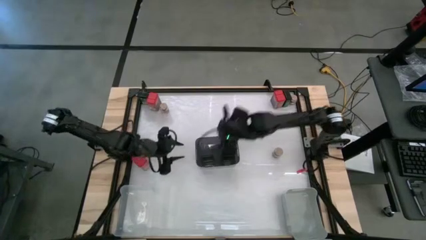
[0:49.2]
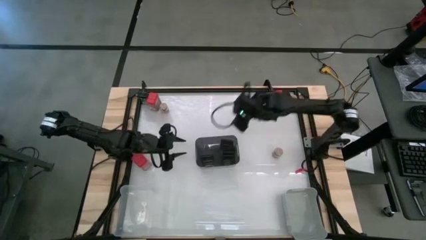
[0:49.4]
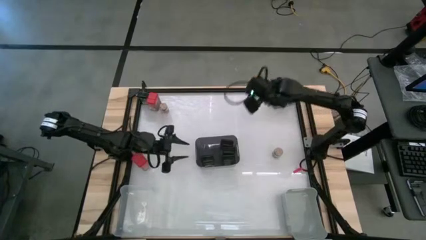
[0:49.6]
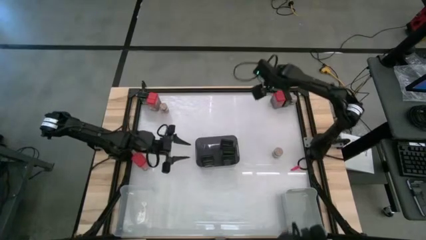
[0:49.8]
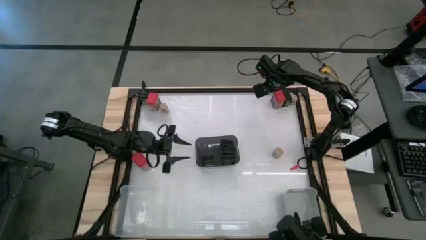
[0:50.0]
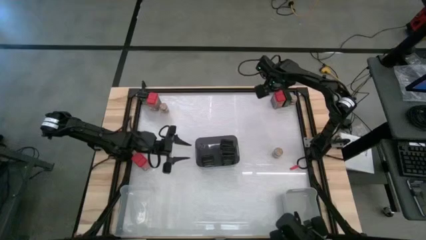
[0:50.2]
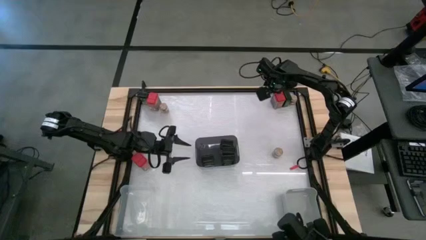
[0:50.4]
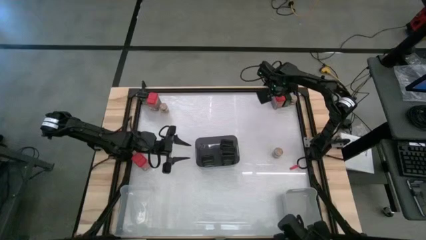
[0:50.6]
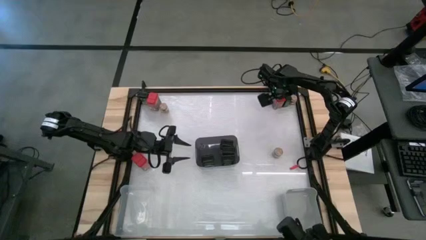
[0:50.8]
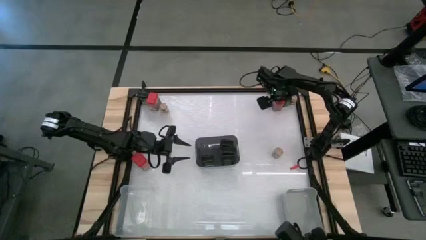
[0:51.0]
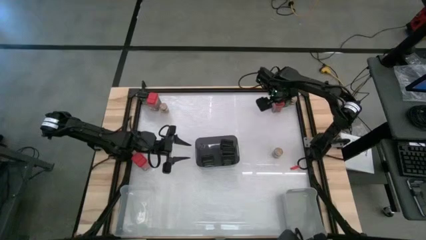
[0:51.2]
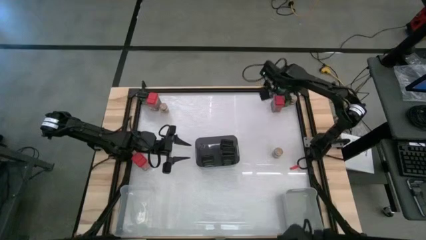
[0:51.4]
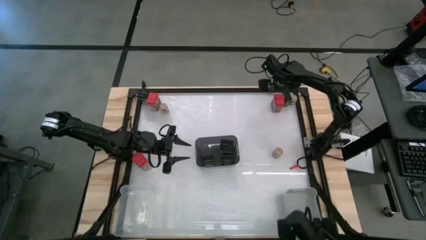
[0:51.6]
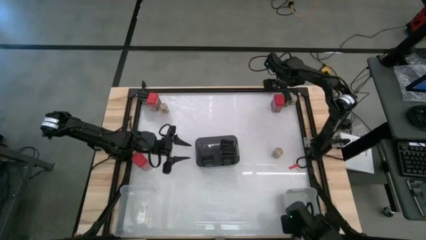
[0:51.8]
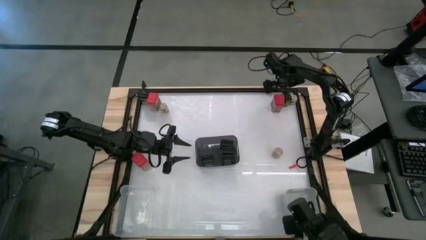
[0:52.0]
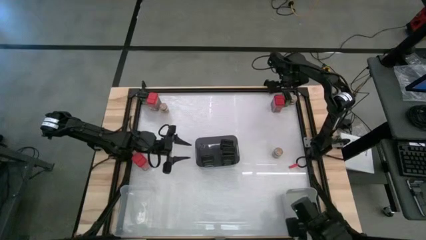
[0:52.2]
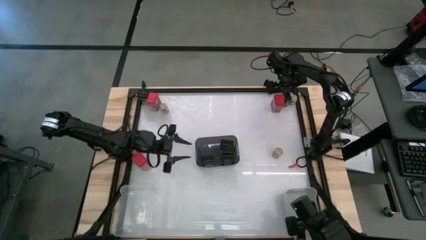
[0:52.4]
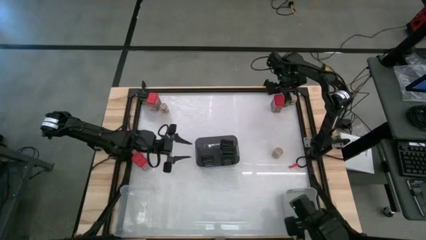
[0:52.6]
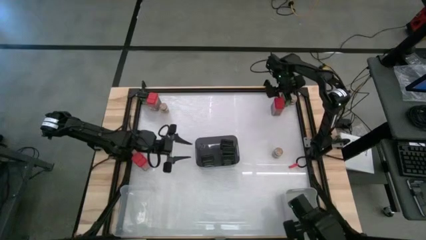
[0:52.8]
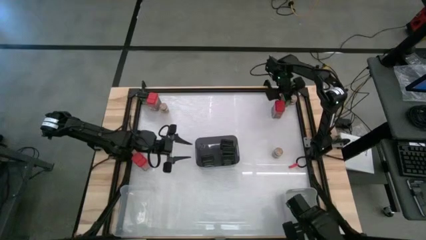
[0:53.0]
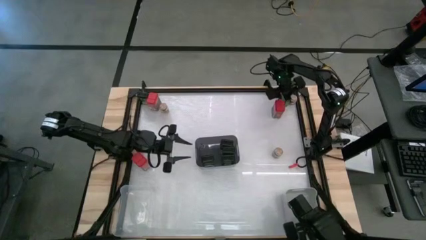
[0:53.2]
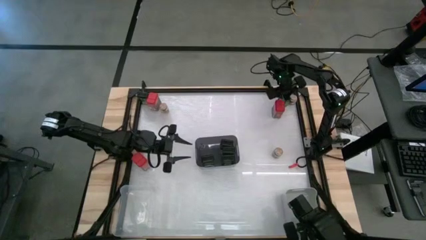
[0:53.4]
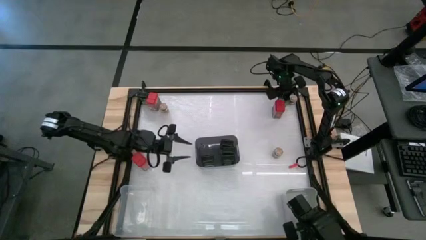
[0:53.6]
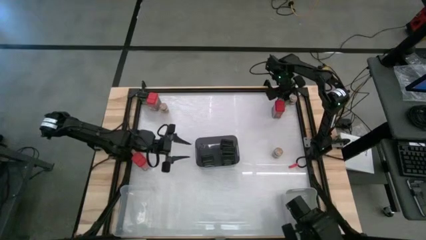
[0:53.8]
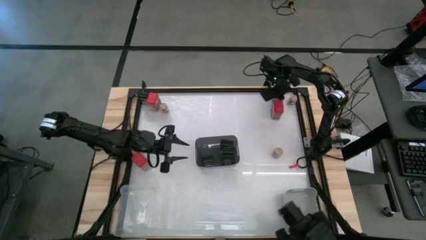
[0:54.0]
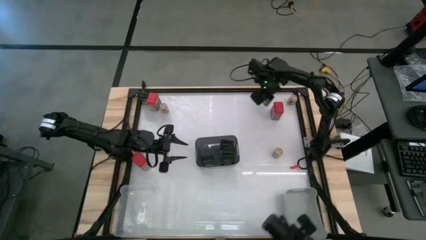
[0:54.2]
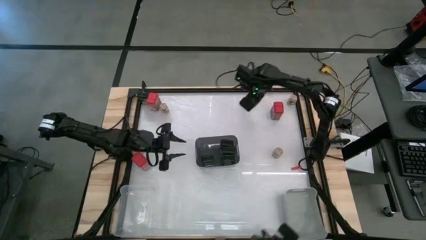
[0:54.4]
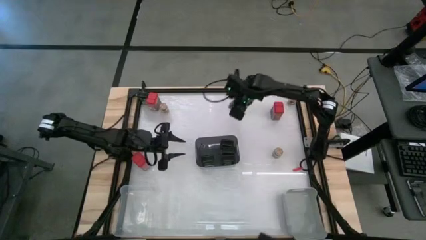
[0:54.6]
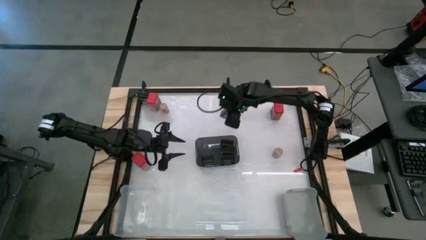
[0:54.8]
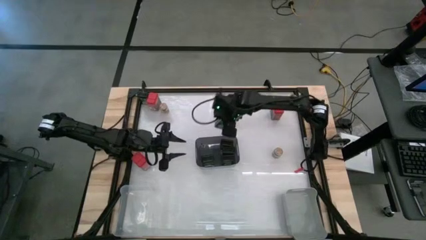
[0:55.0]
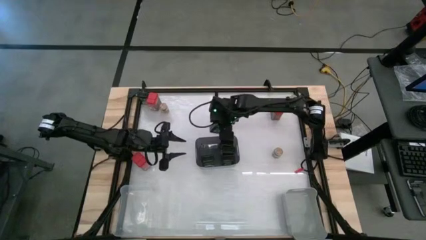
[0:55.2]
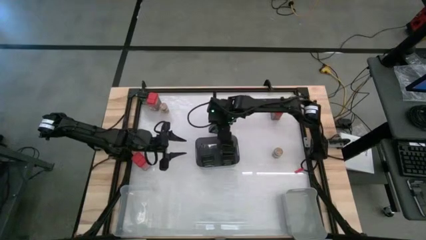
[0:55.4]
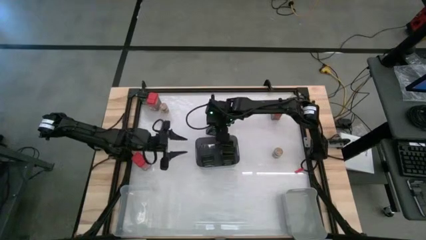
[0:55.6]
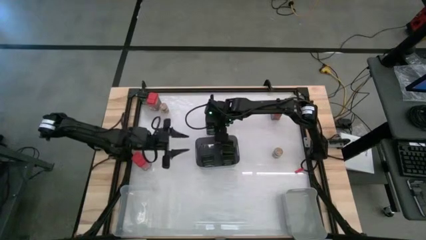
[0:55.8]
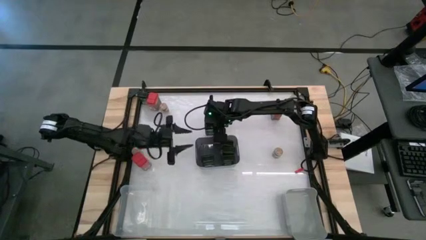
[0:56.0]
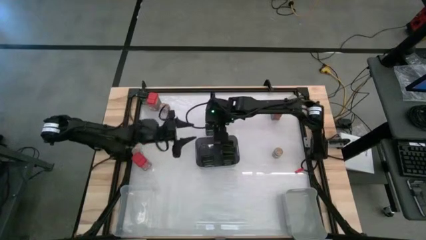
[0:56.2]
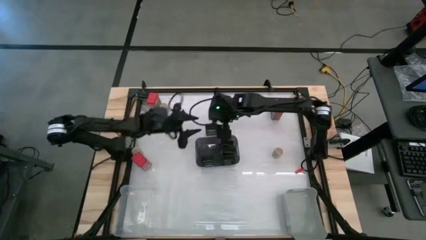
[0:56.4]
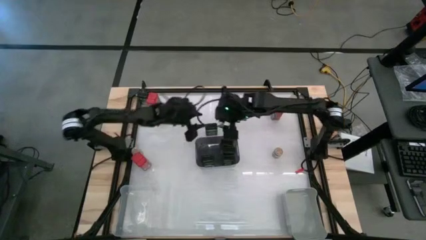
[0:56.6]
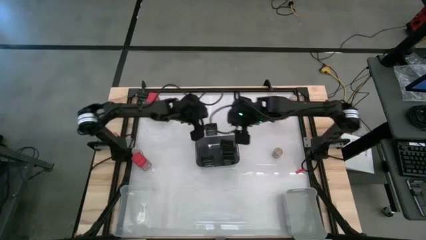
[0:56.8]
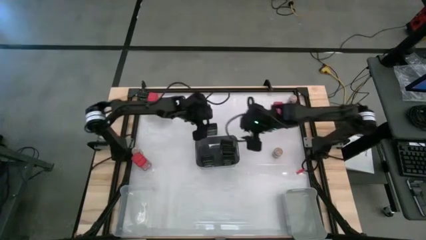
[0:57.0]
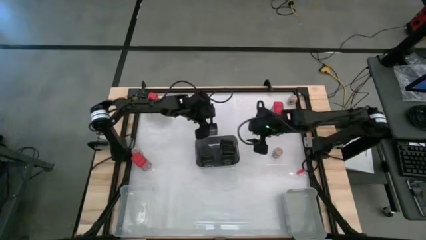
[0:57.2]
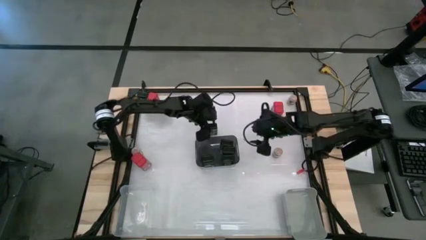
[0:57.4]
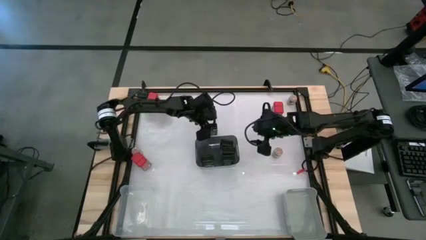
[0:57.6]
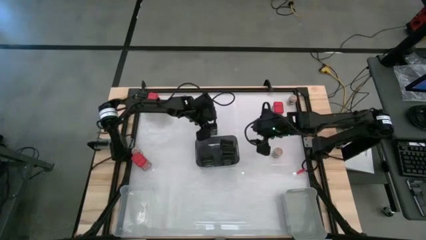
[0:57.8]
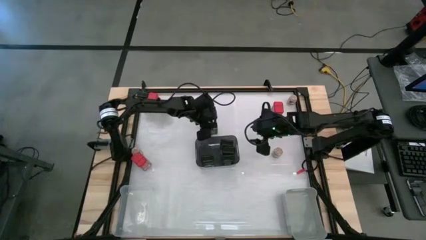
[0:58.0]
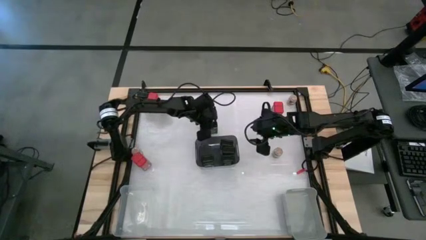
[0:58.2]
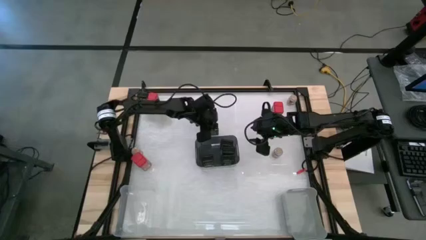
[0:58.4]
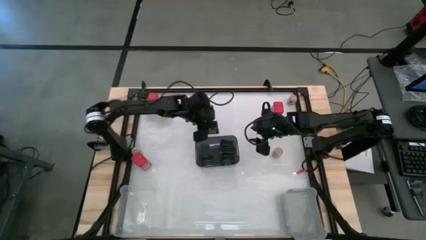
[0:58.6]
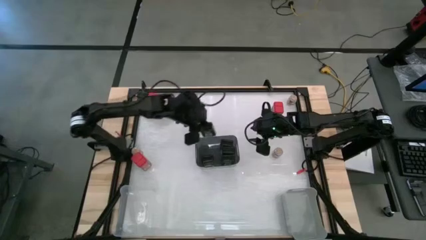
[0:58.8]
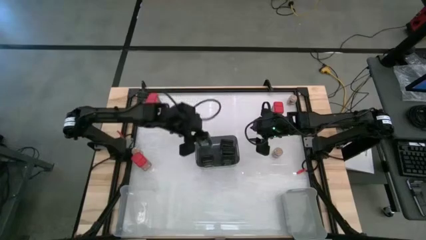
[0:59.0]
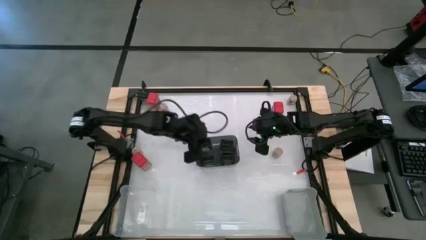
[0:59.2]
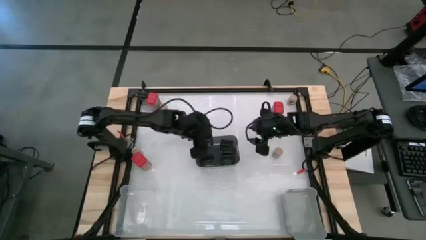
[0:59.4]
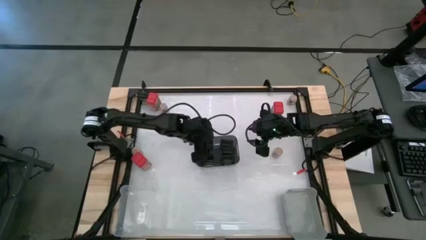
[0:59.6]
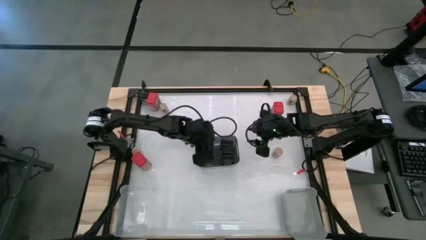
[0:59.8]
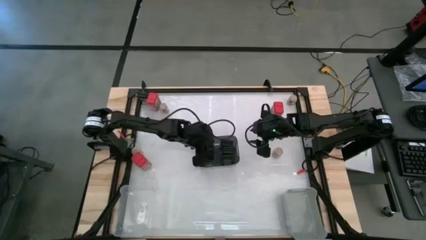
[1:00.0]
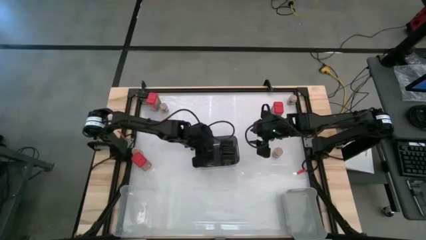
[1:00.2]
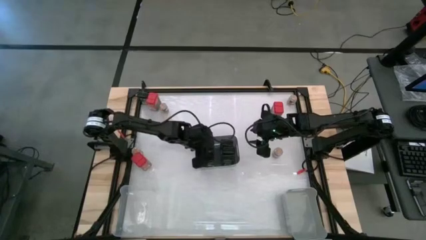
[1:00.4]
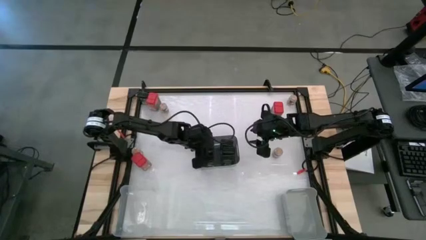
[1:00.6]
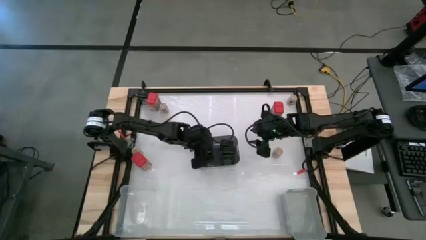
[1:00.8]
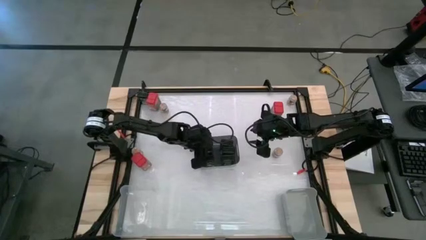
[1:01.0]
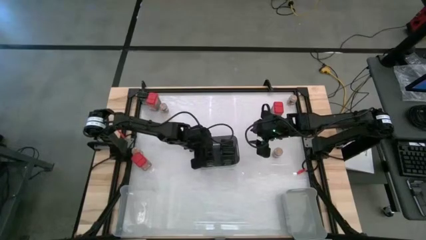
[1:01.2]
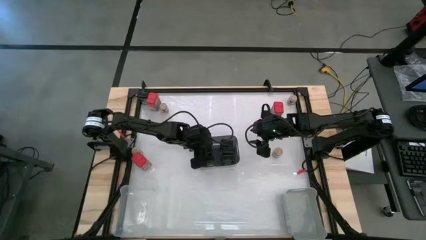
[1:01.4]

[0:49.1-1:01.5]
Task: Sort spices by type
Put the black seasoning can into the black bin

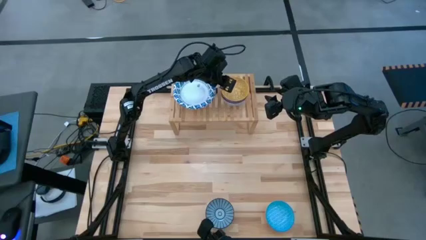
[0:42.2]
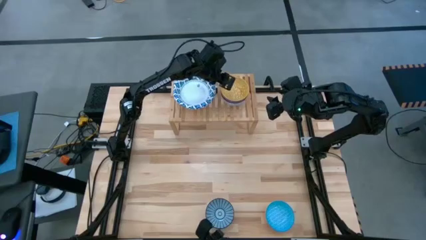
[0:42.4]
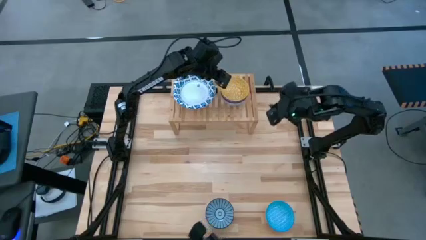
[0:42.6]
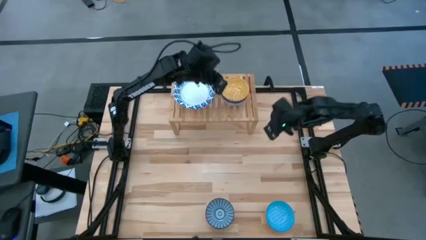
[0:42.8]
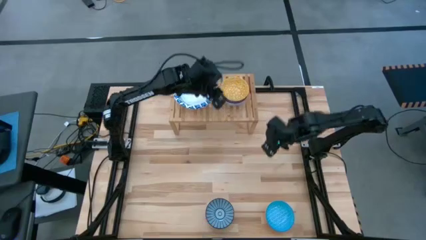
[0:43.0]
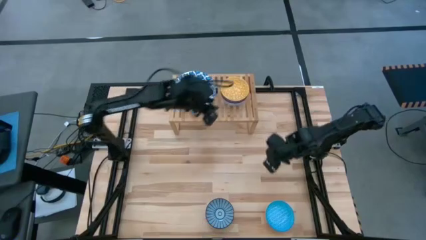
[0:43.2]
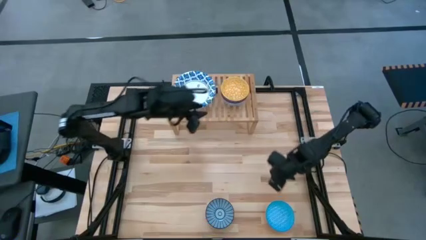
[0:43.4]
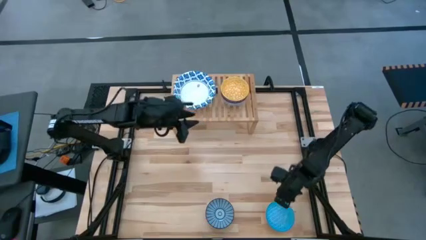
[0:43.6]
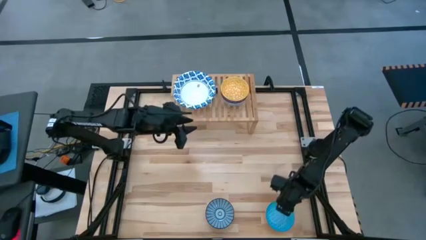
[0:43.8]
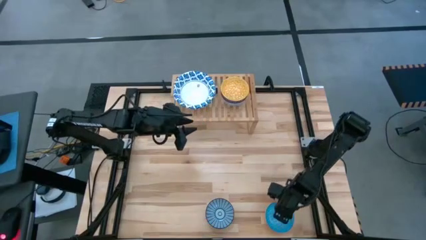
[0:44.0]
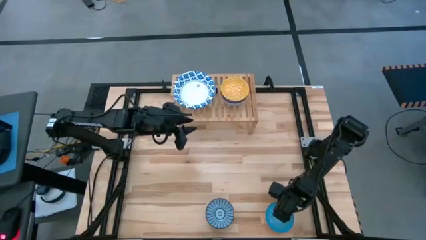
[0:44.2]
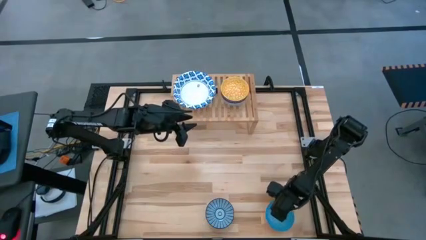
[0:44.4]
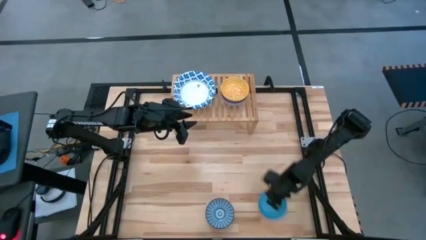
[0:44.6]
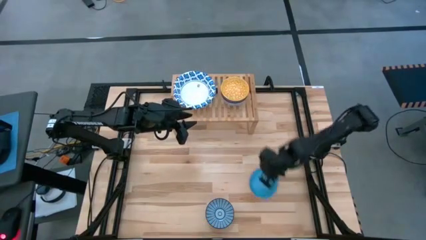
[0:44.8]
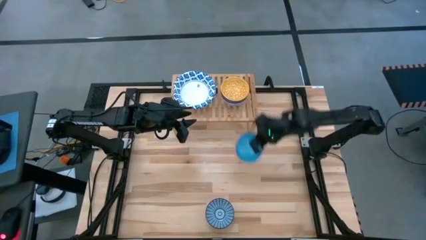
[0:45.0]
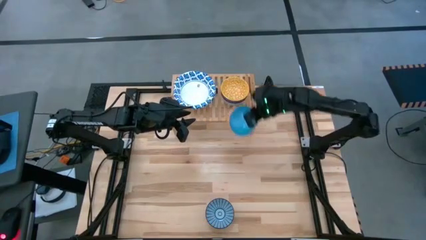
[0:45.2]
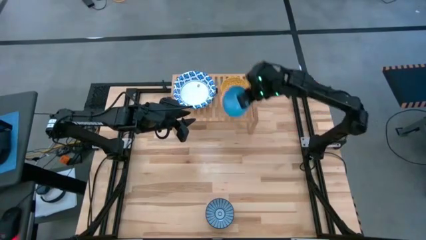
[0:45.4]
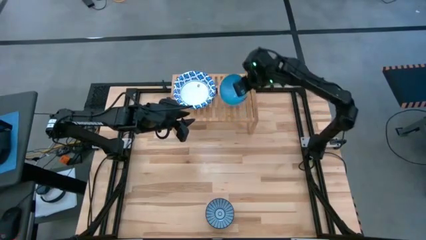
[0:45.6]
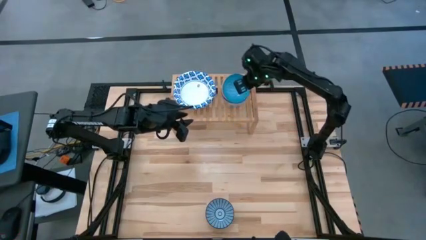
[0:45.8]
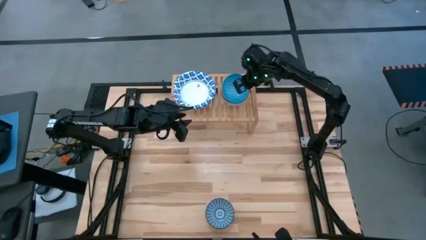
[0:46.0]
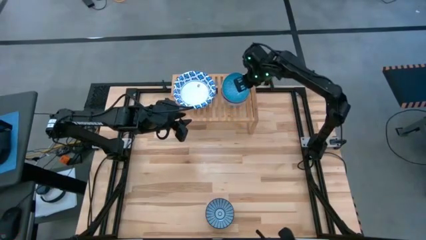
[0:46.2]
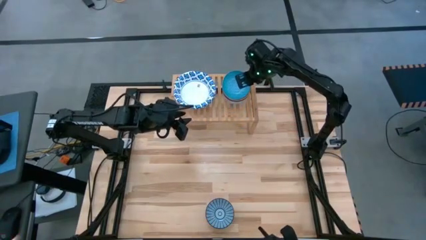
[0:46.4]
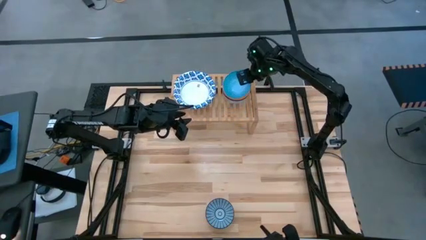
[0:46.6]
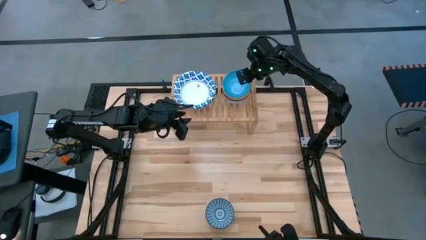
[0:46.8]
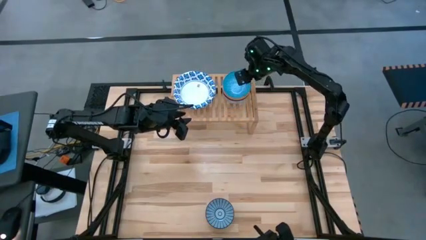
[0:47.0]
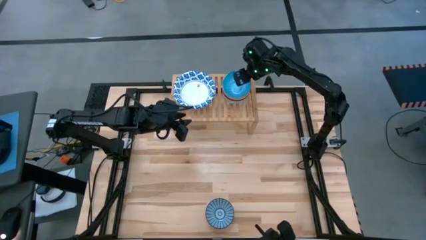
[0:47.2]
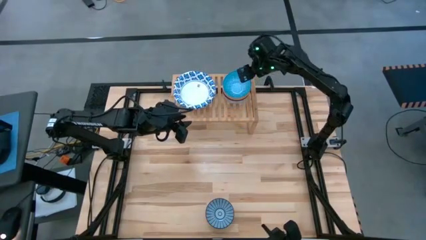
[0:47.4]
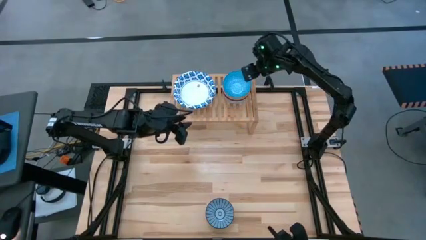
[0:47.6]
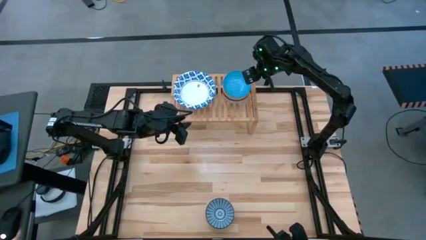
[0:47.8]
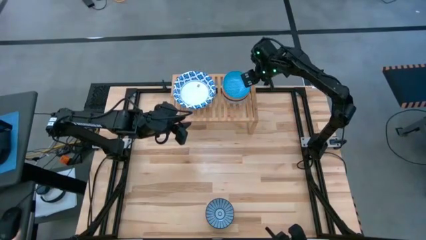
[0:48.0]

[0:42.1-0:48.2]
Task: Place and stack bowls onto a shelf
Stack the small light blue bowl on top of the small yellow bowl
